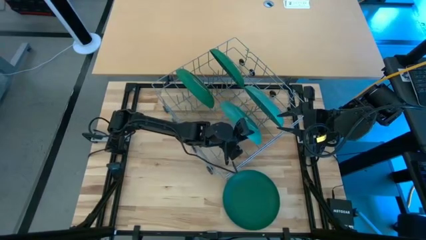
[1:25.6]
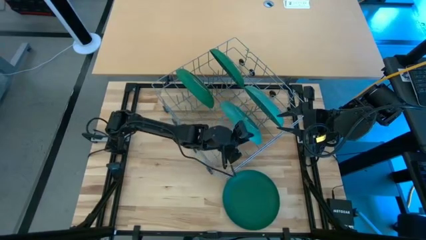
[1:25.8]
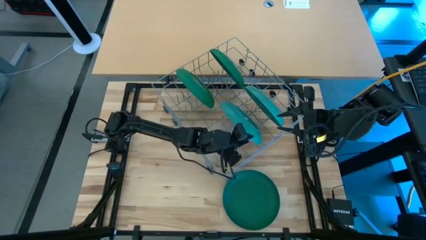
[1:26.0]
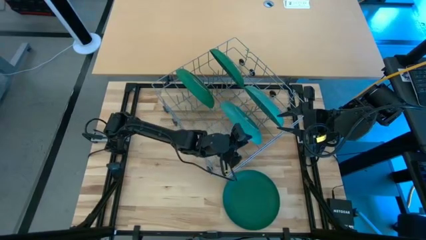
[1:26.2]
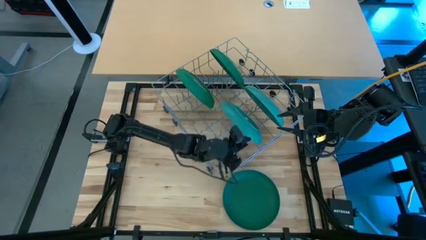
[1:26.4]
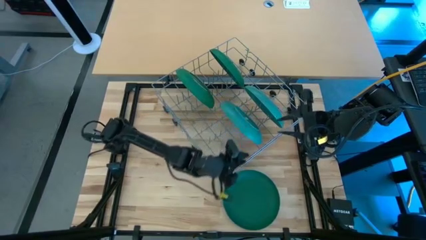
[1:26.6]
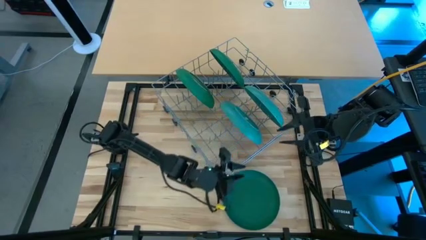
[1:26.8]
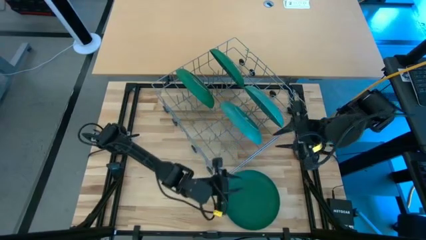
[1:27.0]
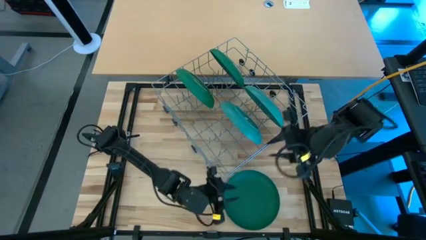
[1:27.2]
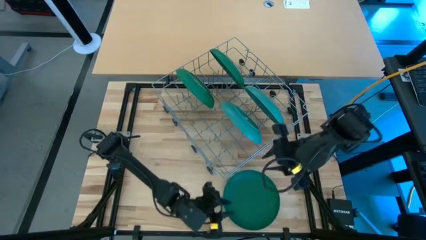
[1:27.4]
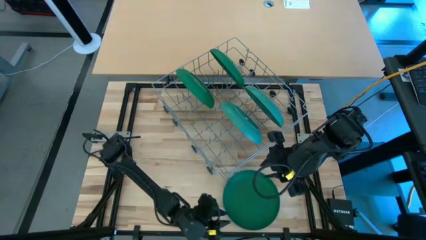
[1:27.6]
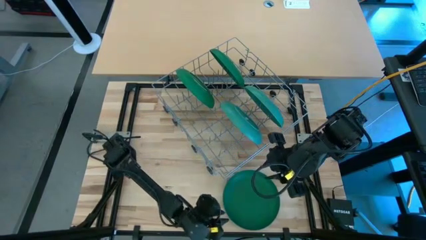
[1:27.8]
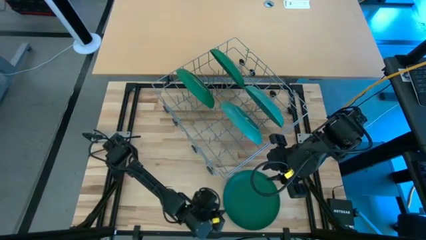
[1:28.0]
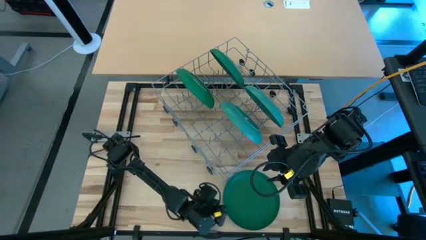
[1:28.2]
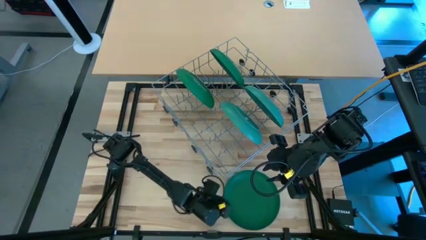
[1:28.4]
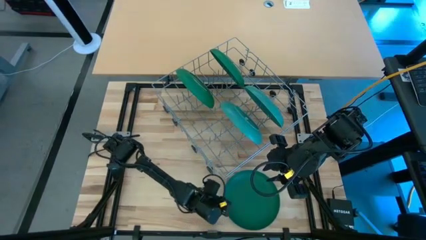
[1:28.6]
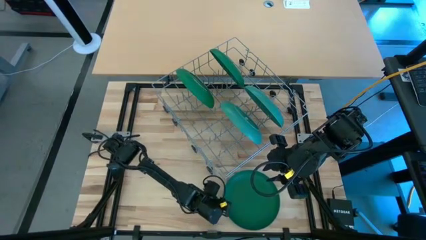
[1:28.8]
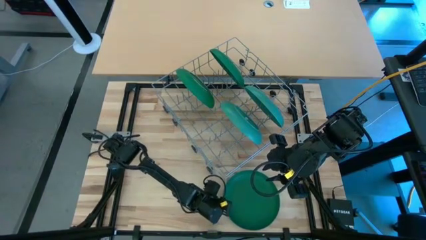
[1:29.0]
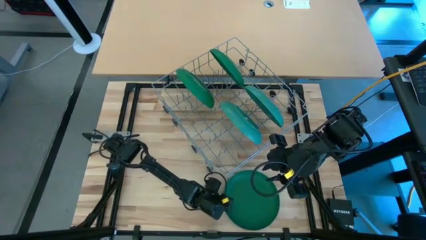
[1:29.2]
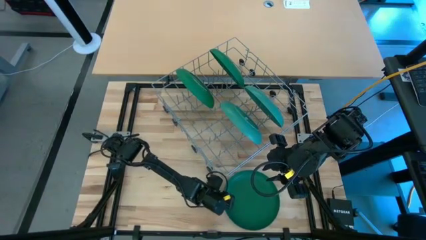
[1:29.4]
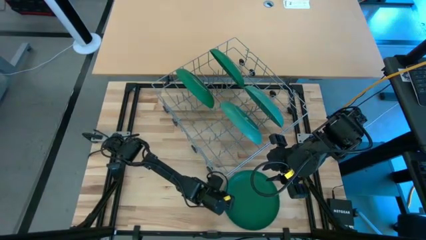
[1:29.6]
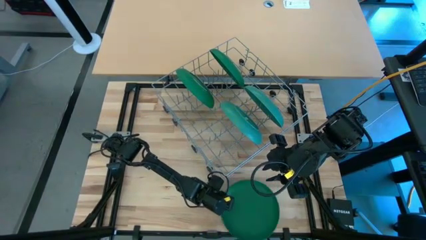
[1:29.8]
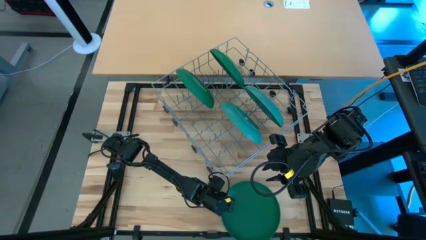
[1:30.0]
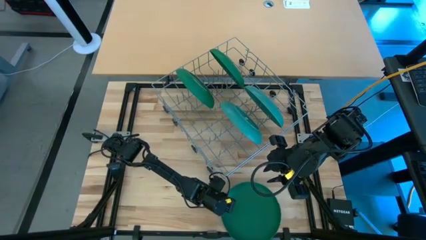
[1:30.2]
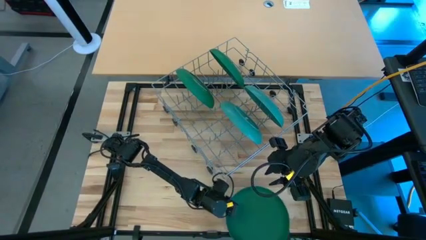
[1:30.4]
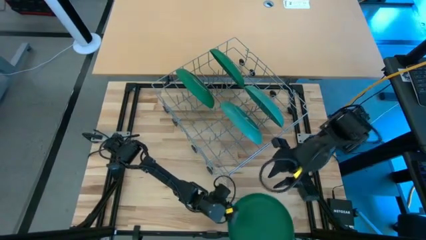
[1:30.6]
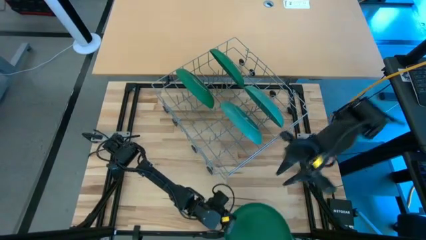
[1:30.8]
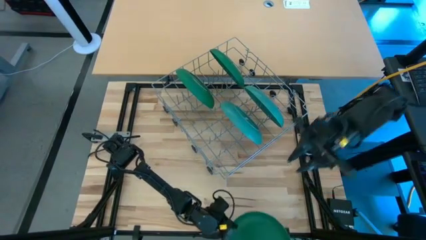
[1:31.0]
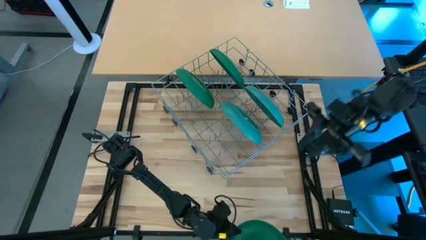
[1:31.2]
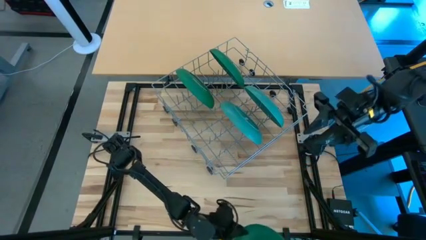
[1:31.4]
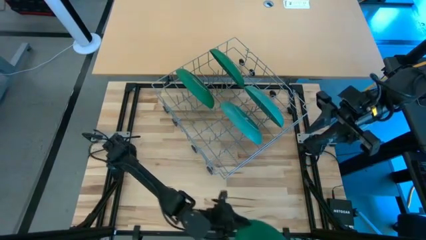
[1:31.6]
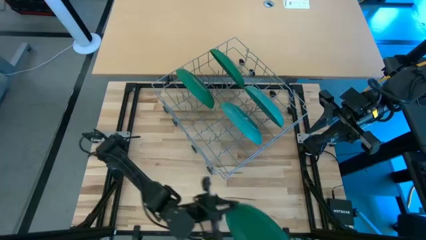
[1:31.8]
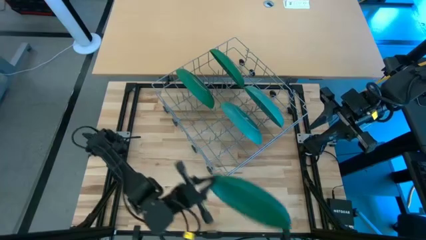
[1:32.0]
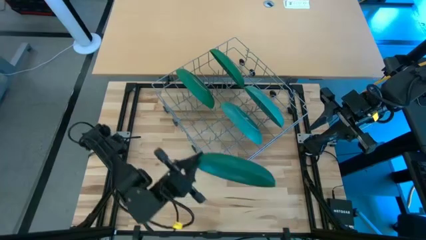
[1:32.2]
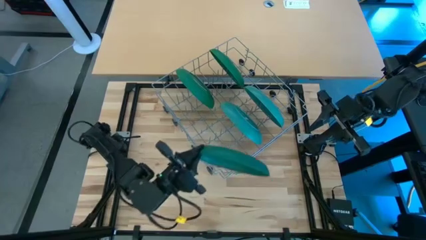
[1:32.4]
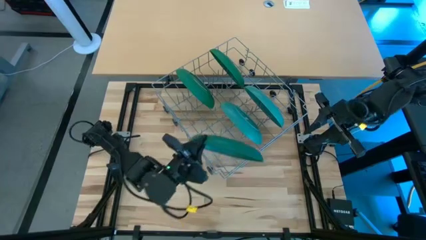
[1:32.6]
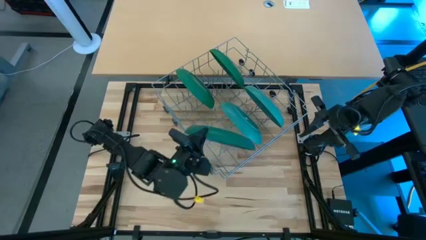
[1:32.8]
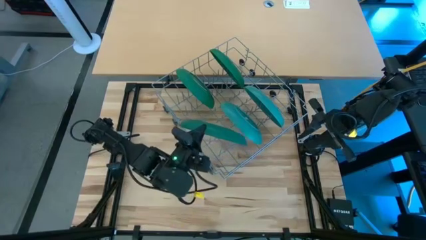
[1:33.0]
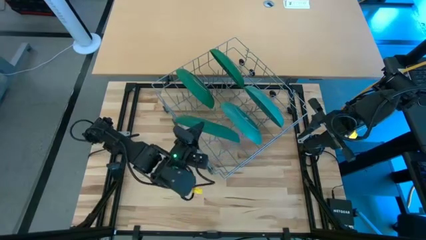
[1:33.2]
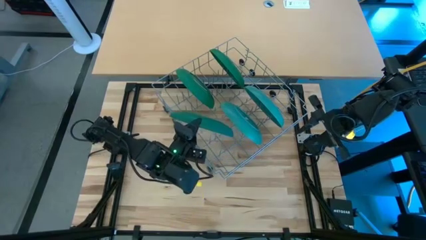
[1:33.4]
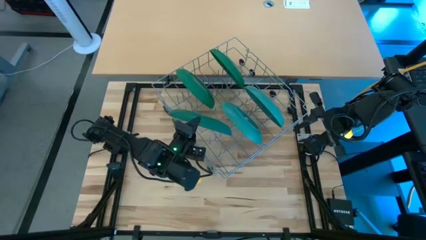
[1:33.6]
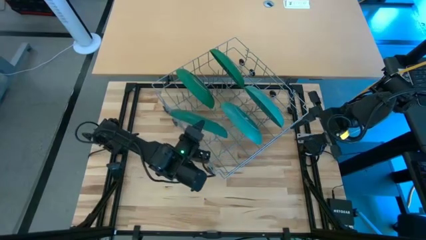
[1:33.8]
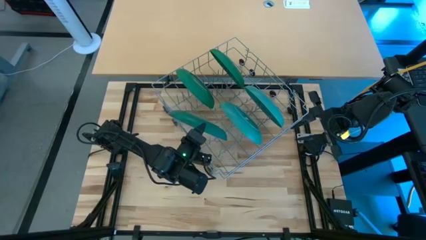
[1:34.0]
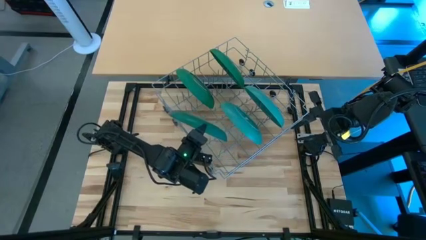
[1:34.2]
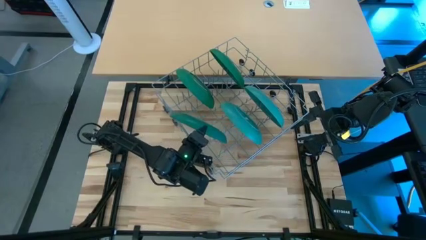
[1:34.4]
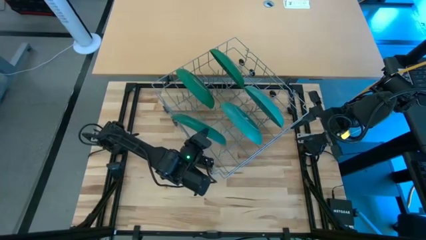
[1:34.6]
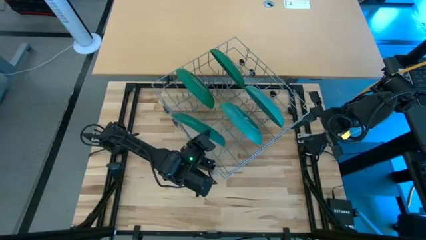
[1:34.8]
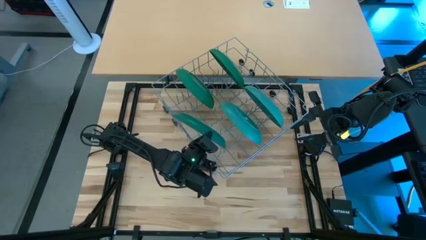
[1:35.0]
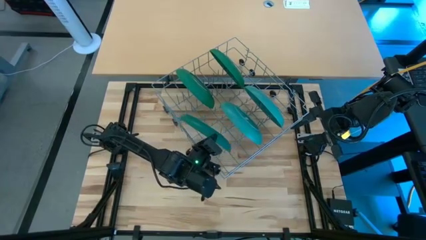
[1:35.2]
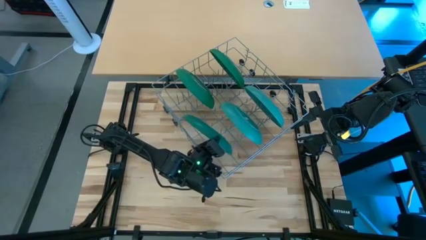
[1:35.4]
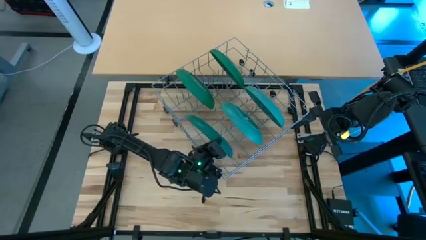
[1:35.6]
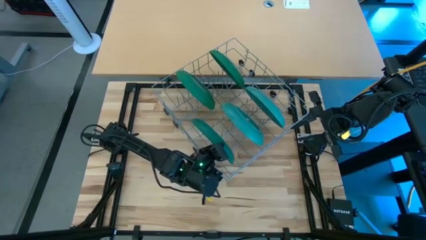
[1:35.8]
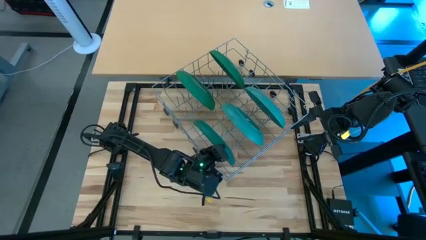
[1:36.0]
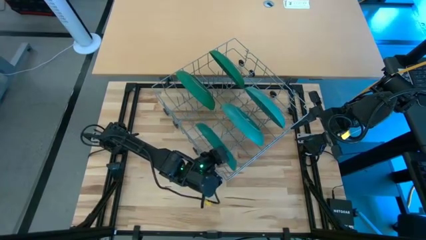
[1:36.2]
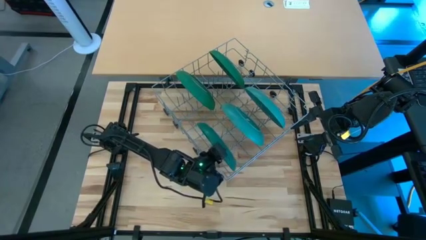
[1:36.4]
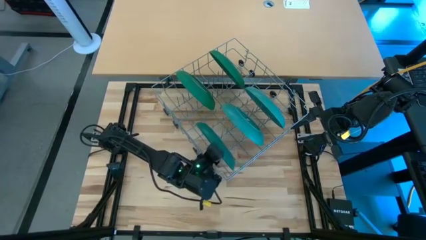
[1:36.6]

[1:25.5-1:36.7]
Task: Sort dishes
Put the blue plate into the dish rack

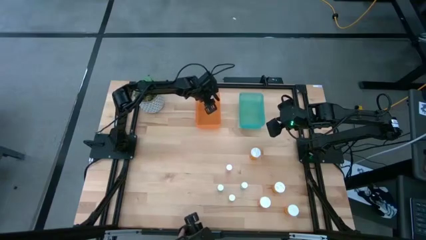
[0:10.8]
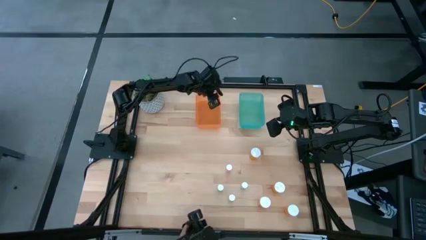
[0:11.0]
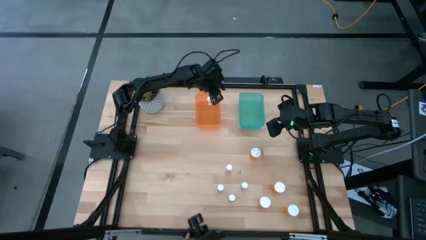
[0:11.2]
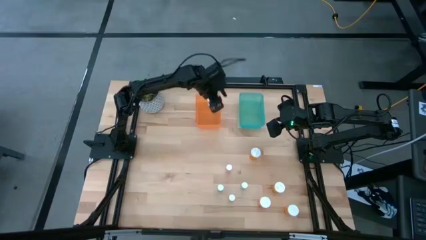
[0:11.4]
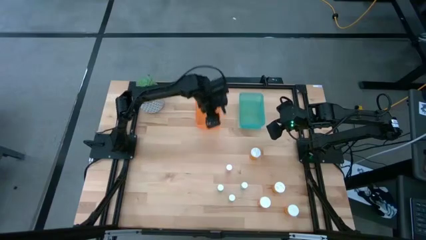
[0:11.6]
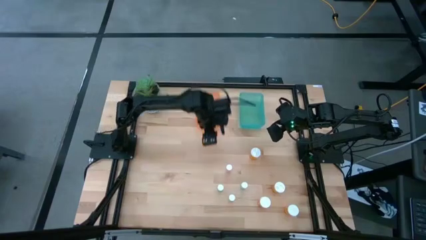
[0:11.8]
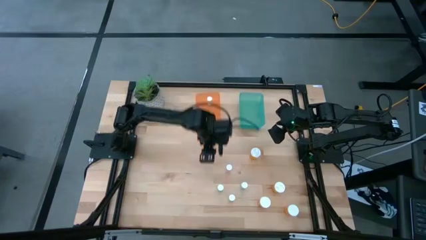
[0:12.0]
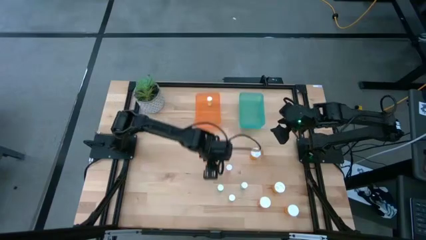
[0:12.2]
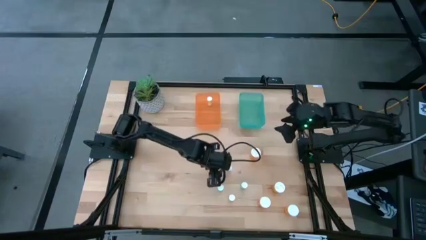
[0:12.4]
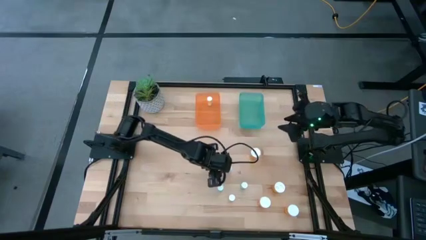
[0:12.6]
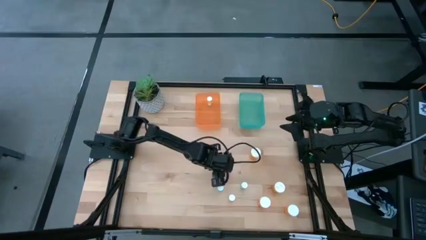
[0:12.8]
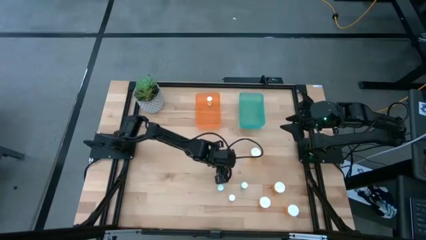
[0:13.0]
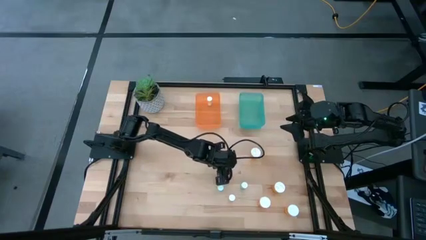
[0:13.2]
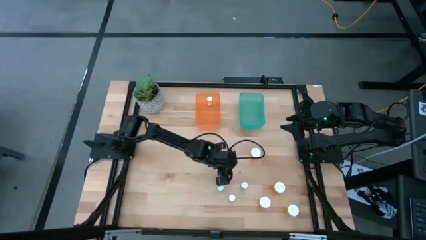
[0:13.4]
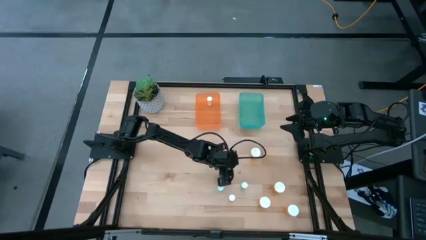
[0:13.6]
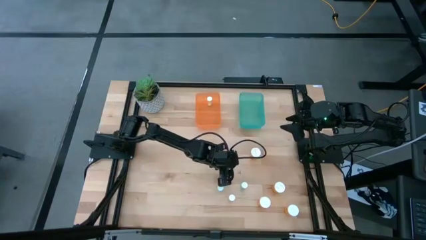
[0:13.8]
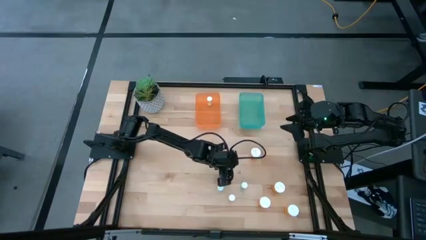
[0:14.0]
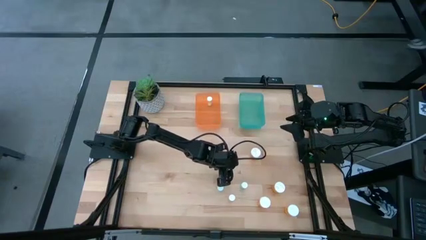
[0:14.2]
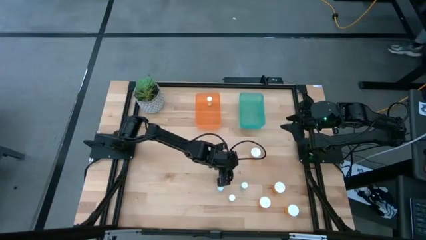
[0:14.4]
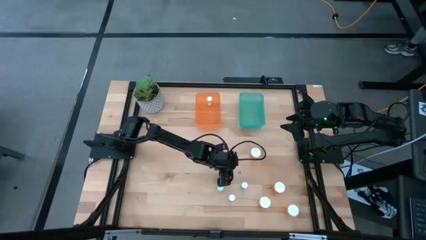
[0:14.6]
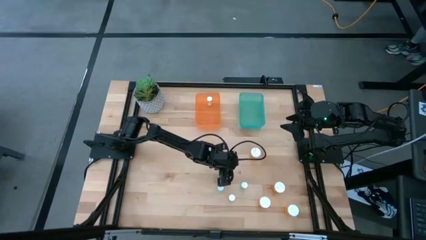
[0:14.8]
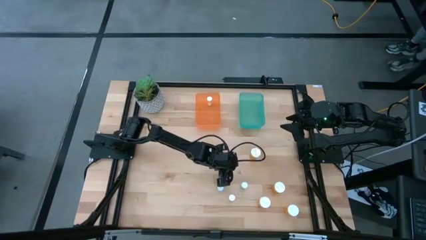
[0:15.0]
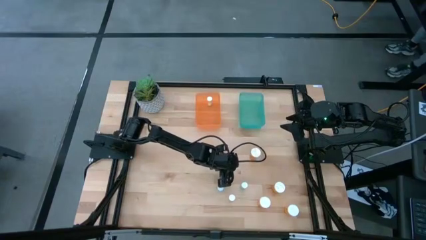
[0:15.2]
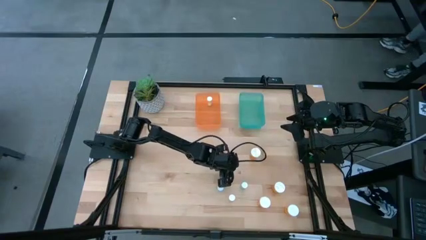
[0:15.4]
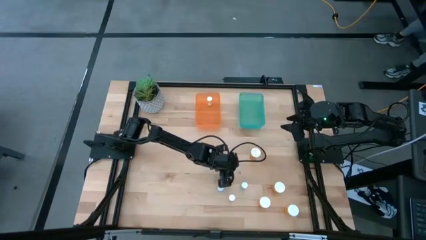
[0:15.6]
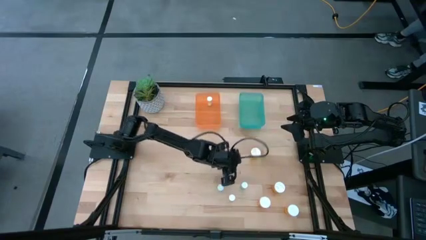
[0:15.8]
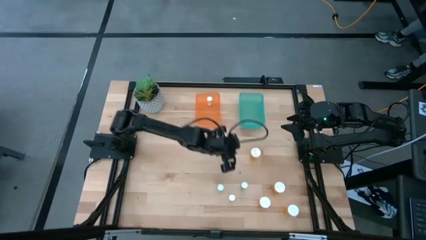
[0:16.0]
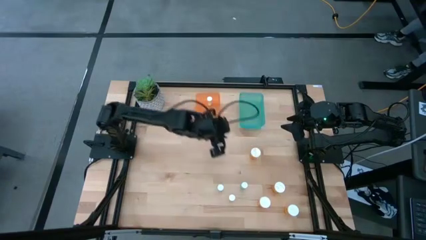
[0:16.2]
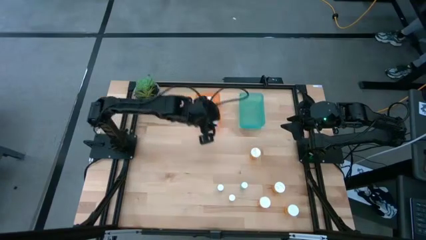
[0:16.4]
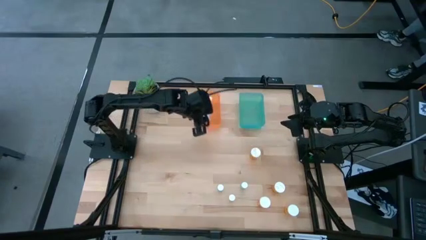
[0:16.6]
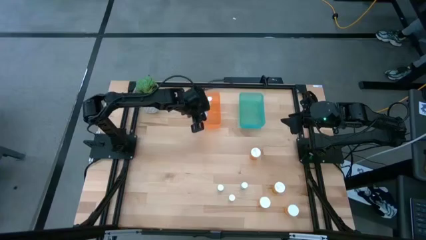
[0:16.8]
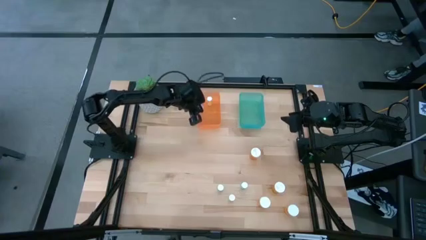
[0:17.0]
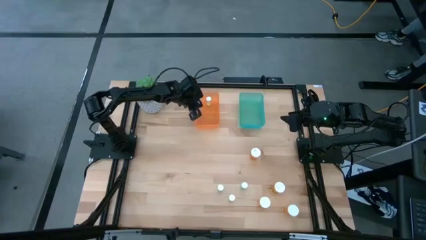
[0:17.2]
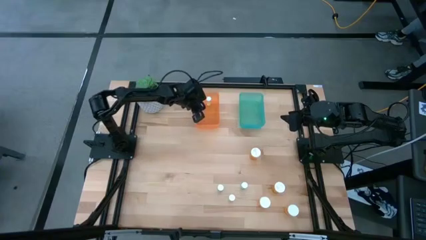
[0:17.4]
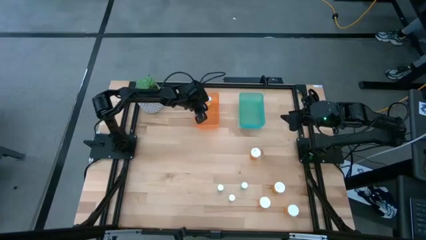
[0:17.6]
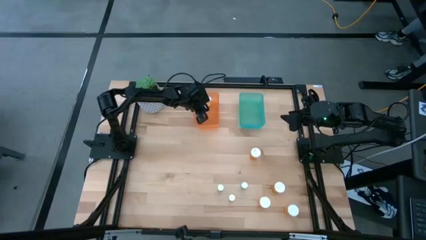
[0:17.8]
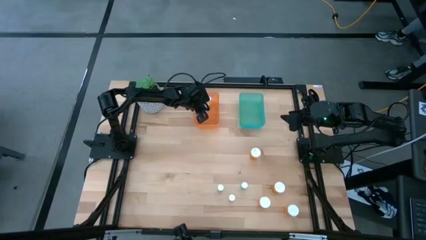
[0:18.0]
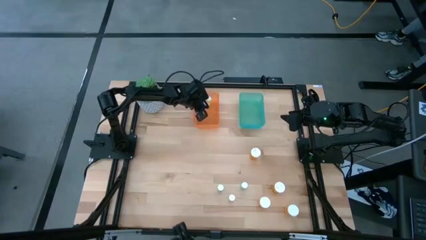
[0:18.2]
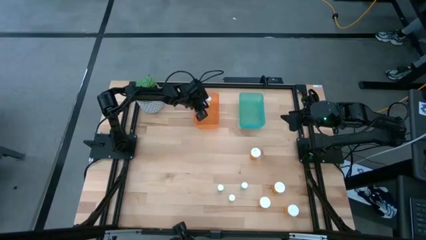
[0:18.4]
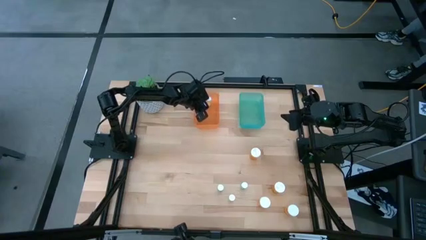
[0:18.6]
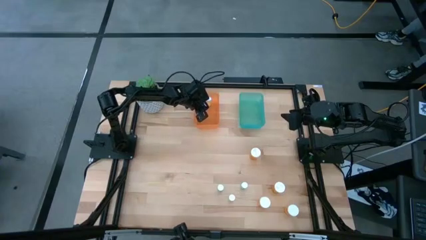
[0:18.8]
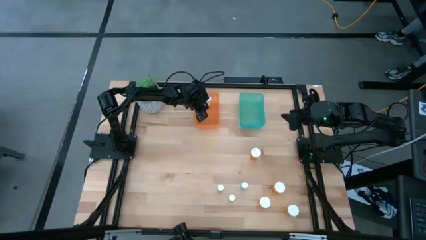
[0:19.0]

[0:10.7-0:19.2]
Task: Pick and place medicine bottles into bin by pill shape (circle, oval)
Put the small pink pill bottle into the orange bin
